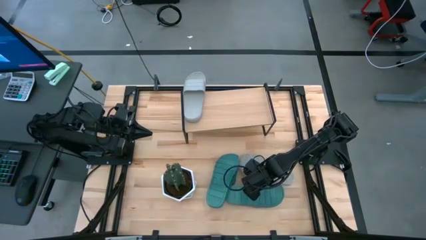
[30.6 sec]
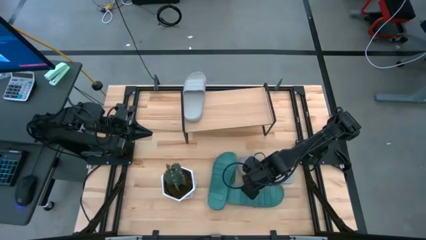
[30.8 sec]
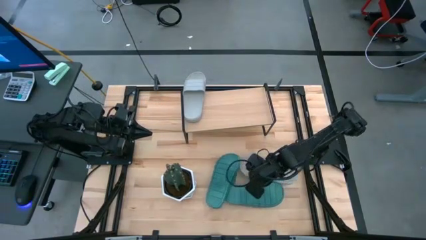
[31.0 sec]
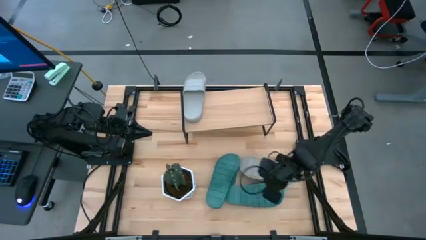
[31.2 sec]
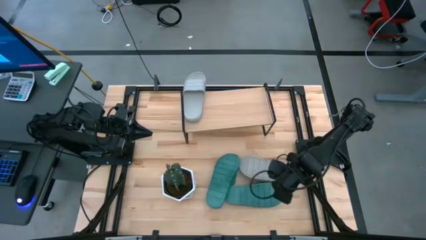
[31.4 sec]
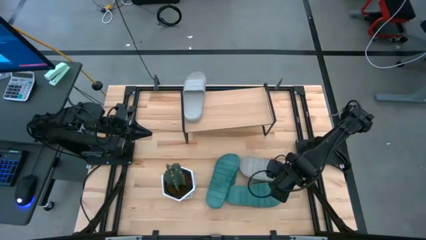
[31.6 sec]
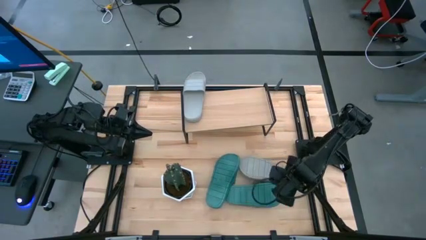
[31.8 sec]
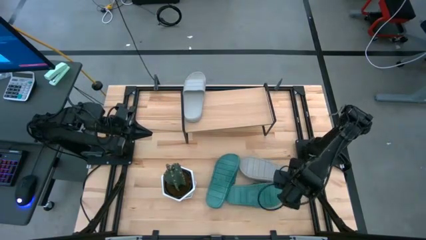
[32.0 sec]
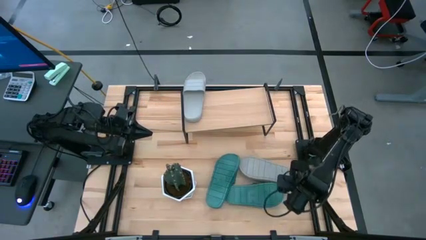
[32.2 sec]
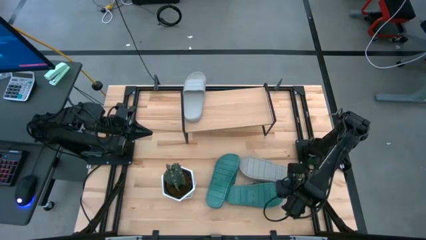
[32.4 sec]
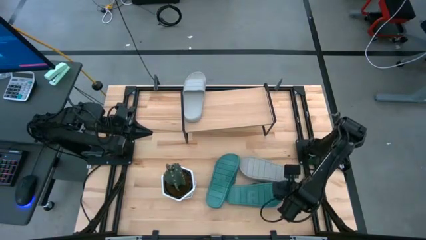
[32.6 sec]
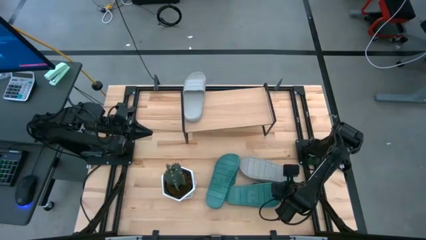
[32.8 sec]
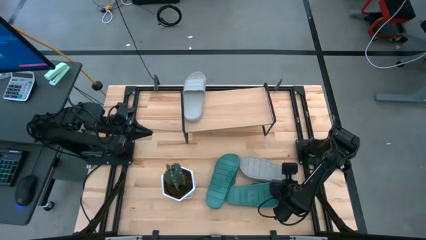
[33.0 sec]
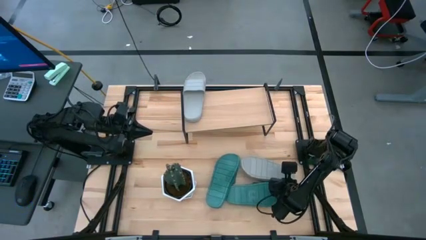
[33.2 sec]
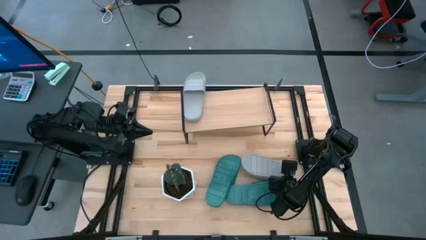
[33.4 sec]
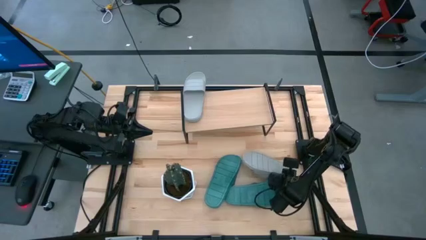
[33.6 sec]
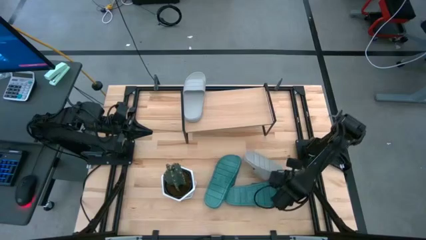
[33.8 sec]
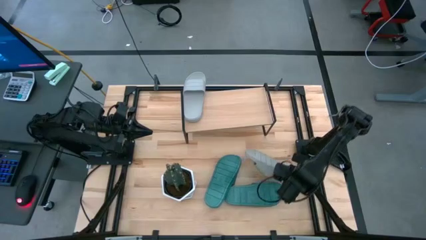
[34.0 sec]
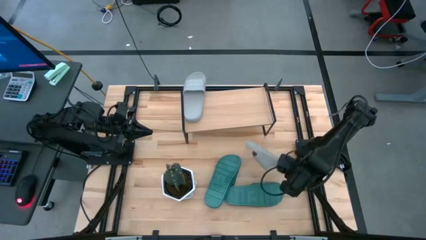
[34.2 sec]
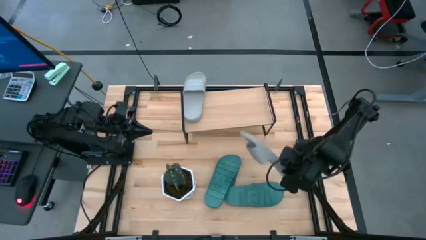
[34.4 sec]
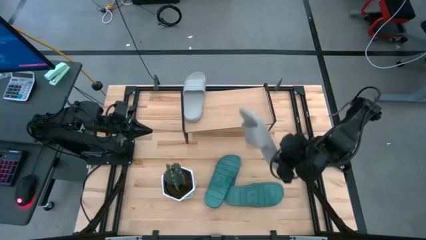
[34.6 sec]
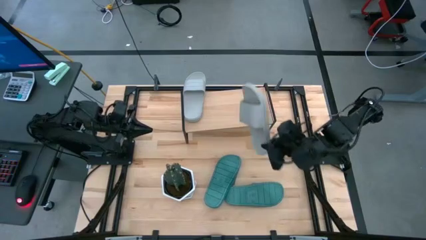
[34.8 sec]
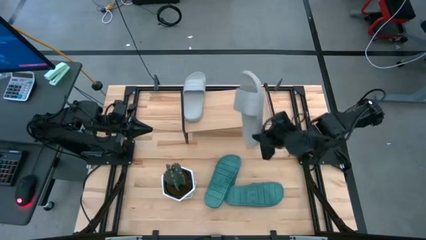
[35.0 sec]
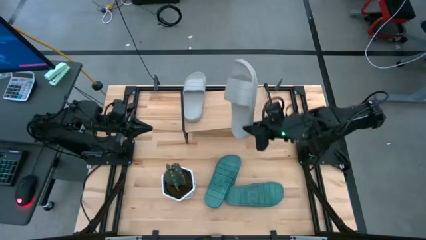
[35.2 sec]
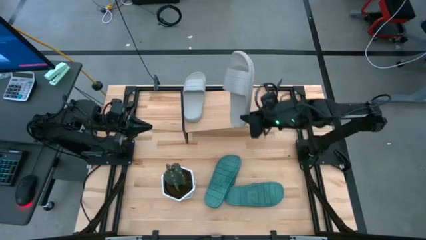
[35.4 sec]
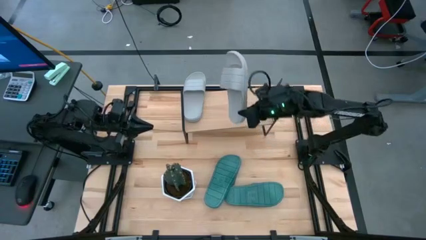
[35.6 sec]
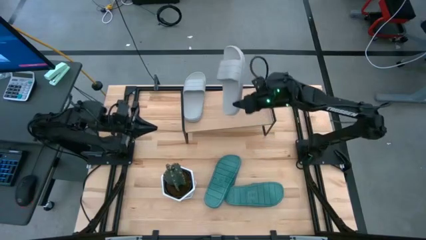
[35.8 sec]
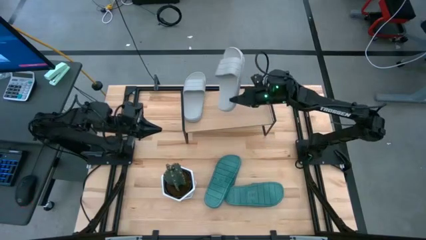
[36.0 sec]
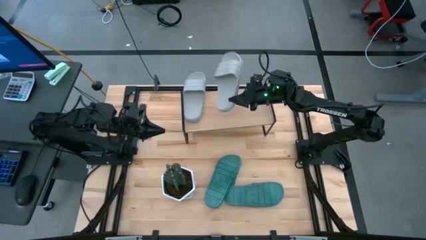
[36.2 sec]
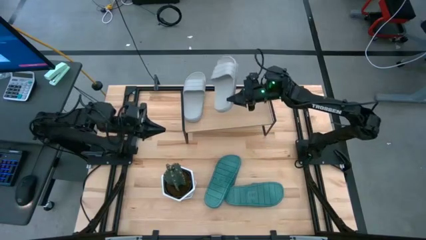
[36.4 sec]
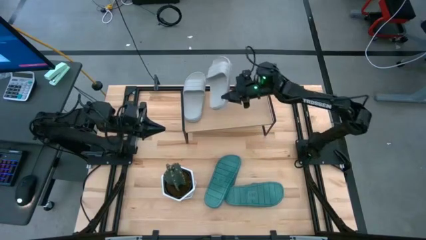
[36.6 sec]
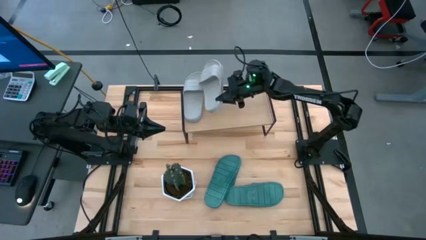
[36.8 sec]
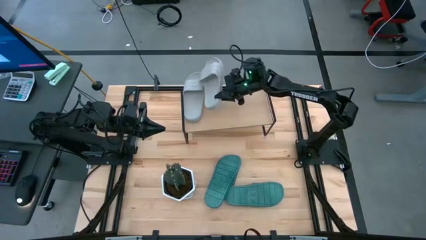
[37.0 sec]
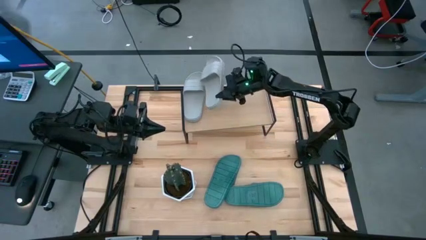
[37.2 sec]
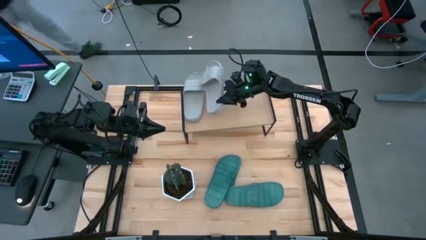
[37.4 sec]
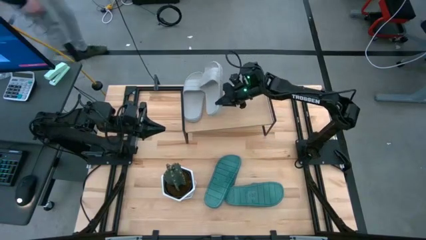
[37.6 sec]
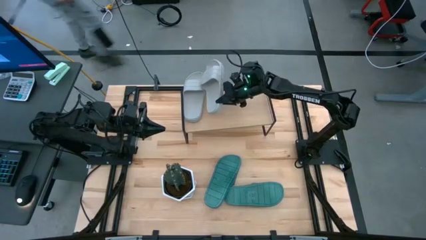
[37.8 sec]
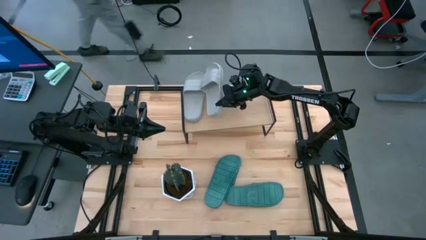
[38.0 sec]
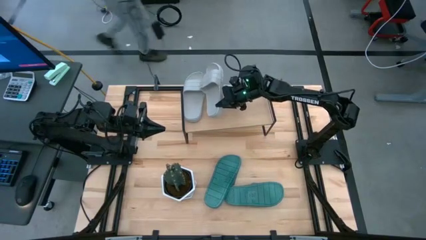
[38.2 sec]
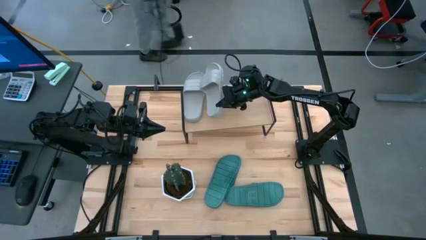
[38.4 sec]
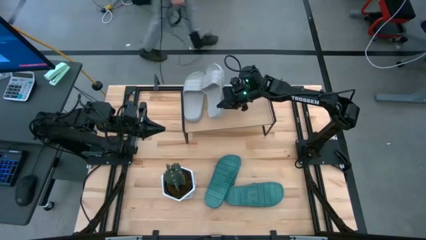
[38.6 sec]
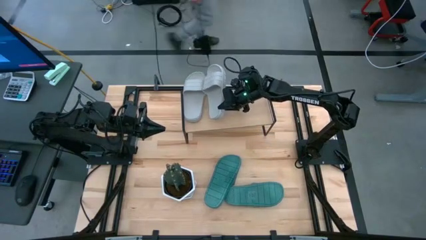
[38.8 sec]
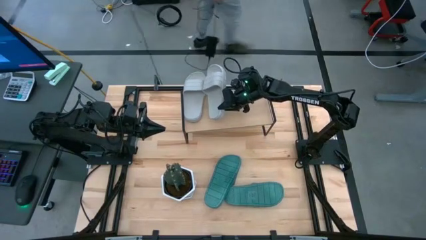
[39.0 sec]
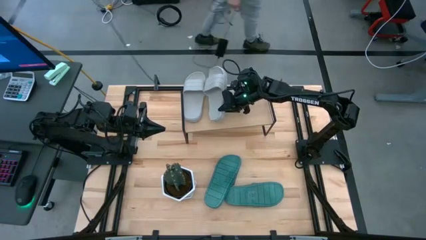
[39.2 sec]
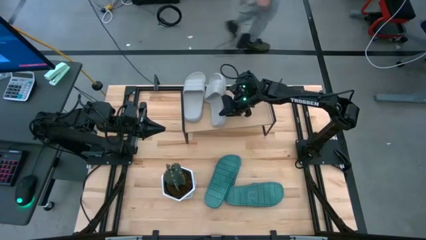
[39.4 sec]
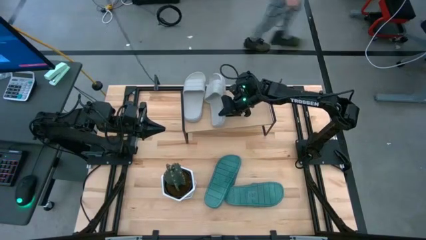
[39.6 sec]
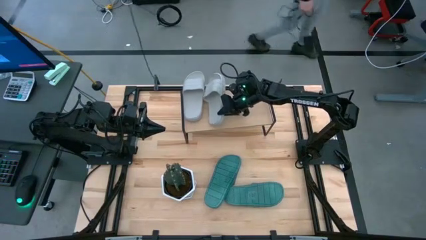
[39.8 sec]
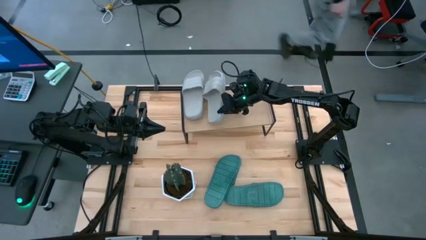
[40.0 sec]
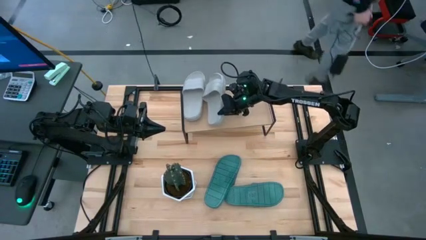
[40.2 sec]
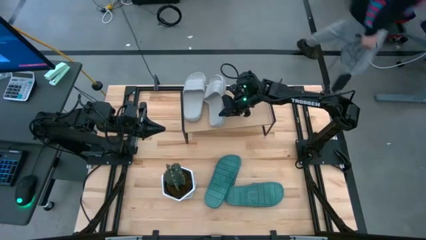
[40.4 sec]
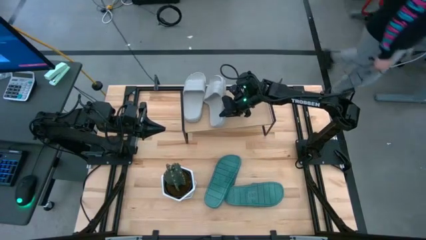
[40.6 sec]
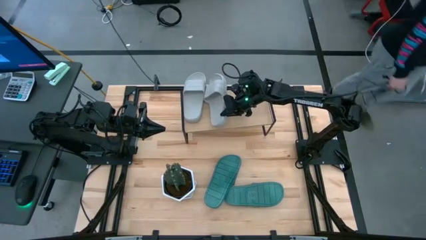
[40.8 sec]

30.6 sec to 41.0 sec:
Task: Pick and place slides into the shelf
Put the gray slides on the shelf
